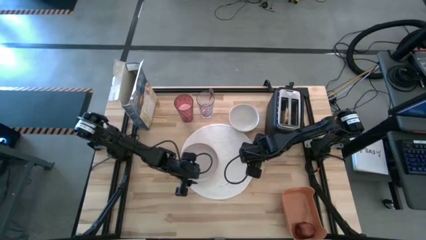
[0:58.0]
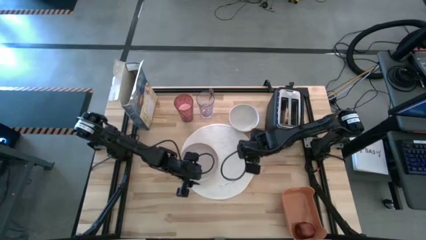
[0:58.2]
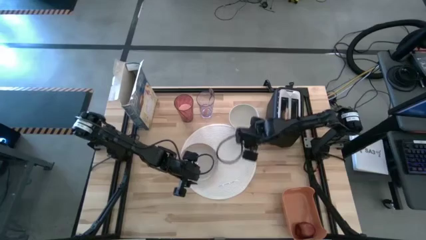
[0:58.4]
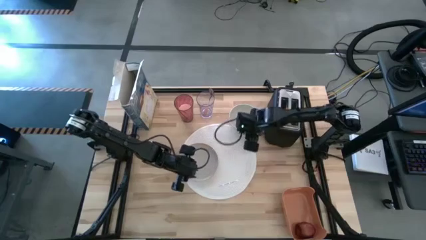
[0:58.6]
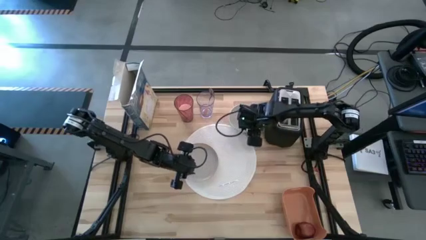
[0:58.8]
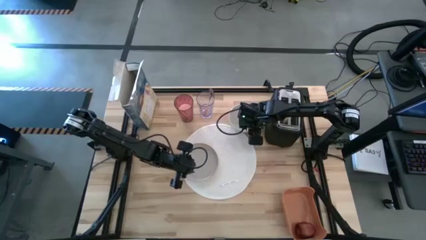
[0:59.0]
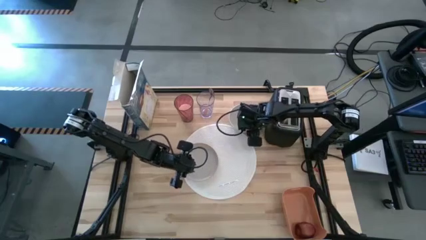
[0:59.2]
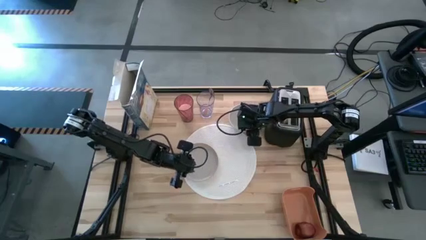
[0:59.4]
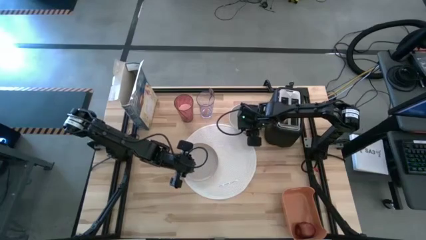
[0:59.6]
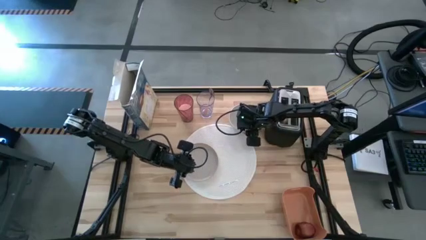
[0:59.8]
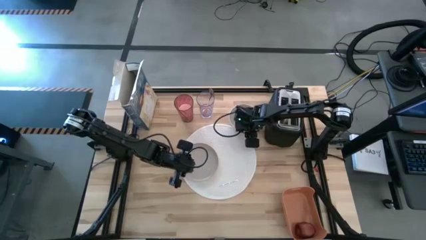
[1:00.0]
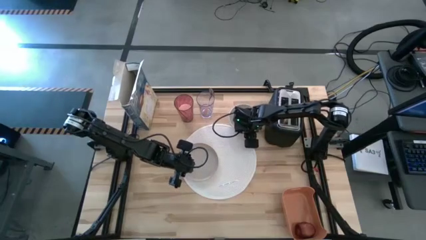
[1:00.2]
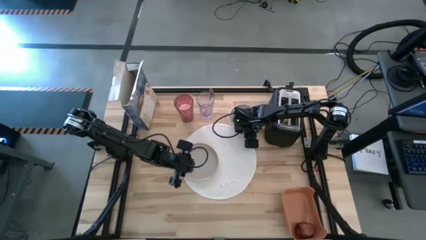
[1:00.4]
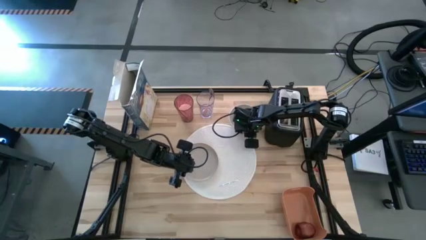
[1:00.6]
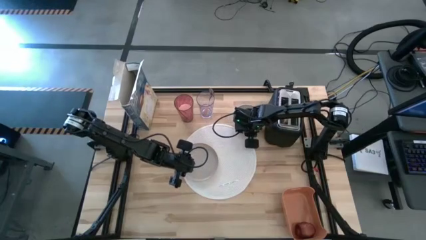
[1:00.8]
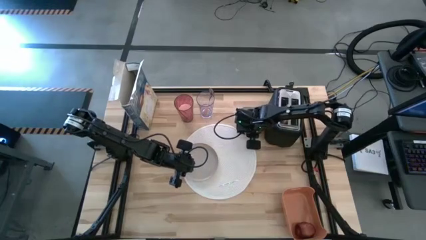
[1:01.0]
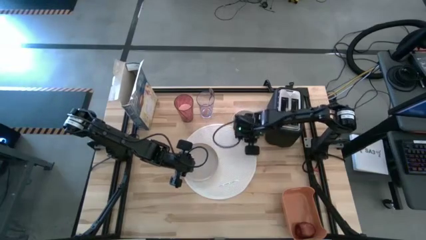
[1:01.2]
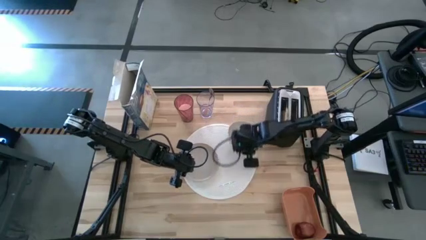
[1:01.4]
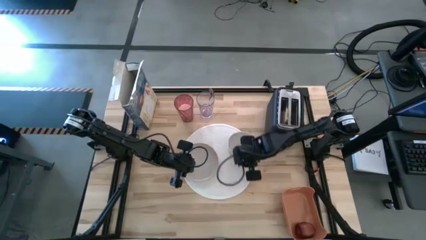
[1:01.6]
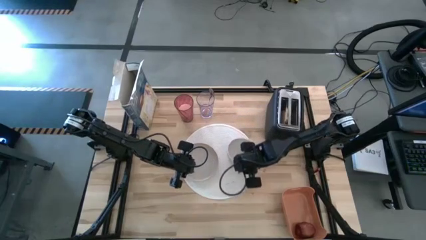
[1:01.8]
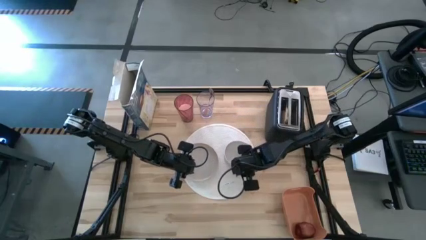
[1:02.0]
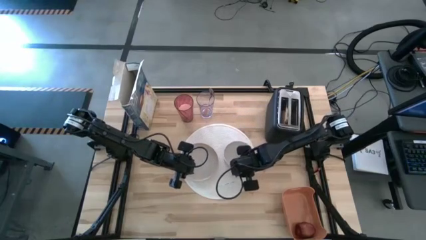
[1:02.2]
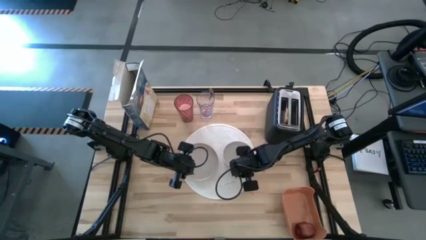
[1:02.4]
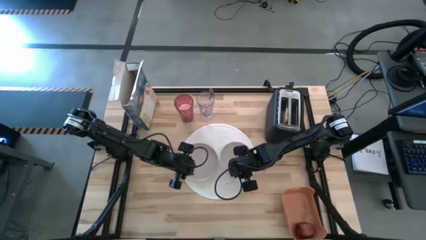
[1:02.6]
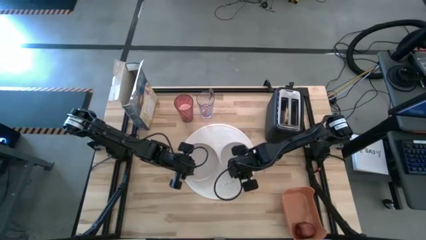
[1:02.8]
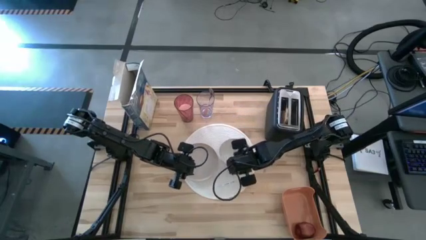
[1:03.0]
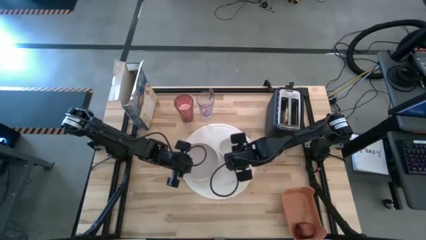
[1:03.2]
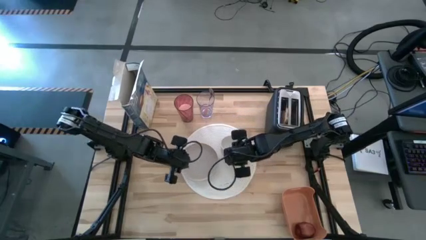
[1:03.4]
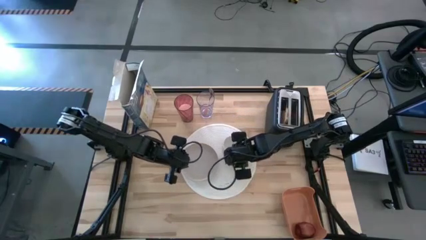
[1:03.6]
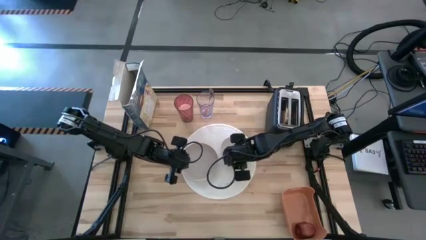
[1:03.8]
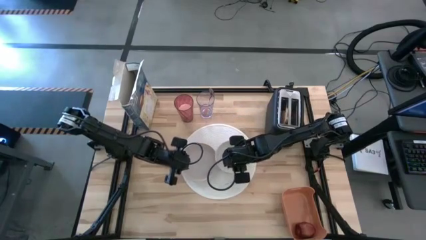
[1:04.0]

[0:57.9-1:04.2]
Task: Arrange a breakfast setting
Put the white bowl on the white placemat to the right side of the peach plate

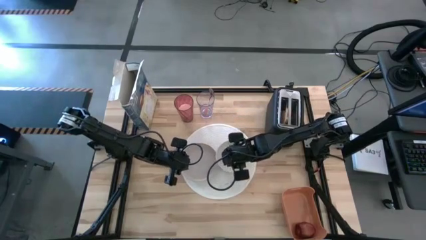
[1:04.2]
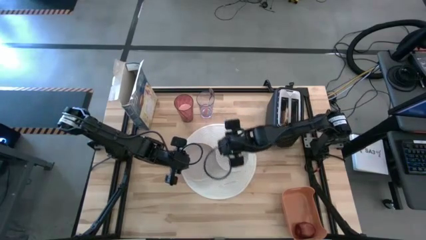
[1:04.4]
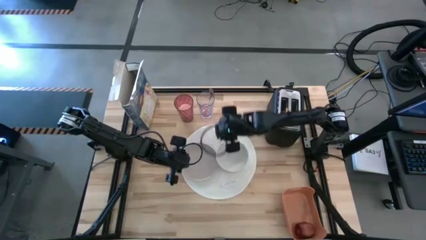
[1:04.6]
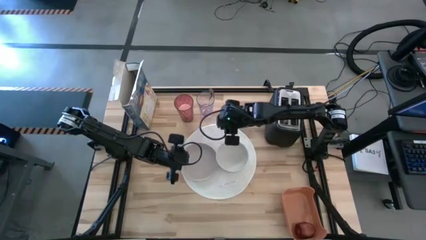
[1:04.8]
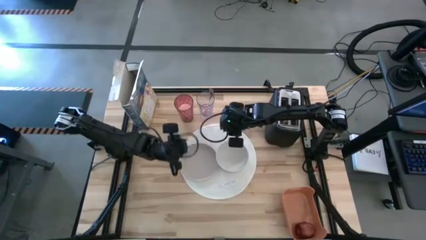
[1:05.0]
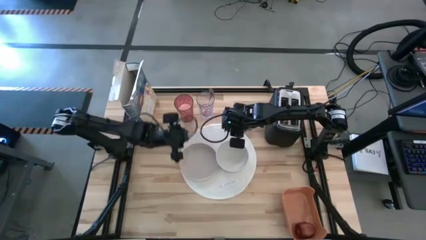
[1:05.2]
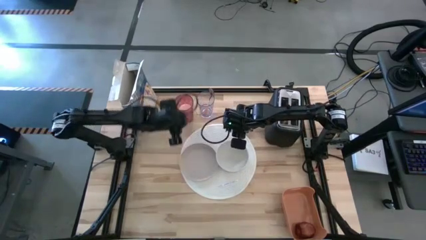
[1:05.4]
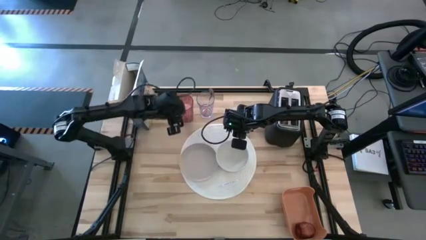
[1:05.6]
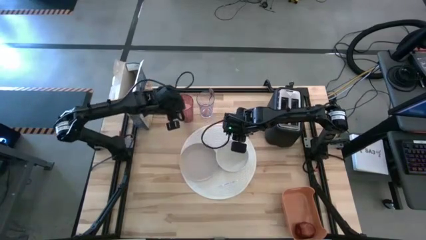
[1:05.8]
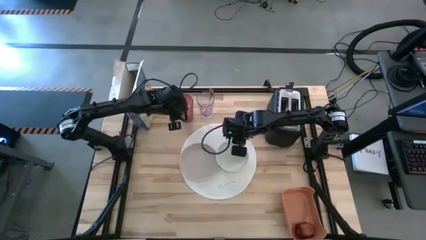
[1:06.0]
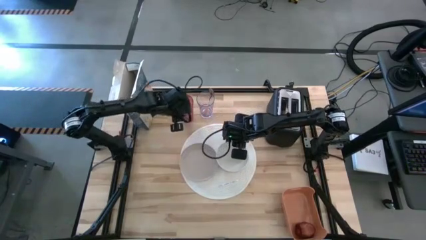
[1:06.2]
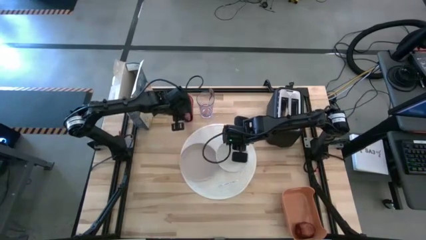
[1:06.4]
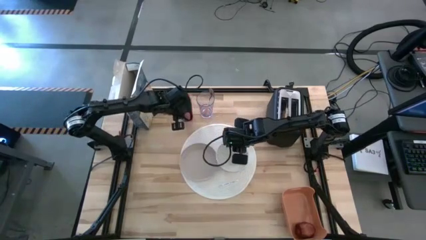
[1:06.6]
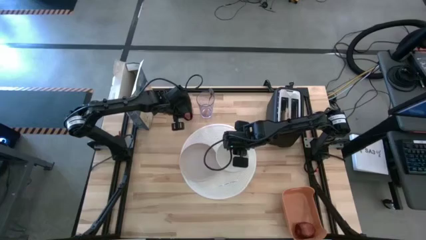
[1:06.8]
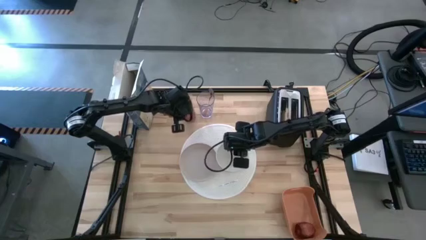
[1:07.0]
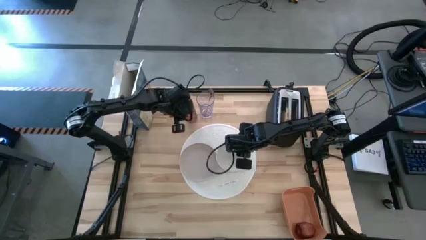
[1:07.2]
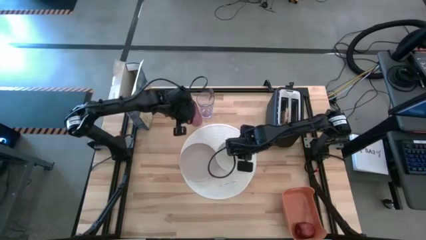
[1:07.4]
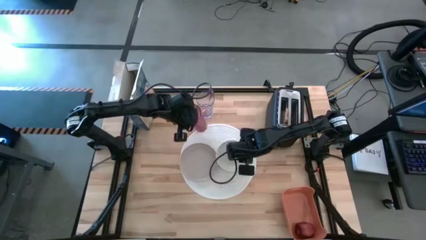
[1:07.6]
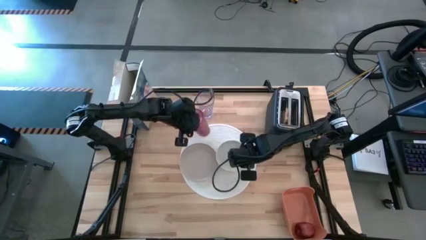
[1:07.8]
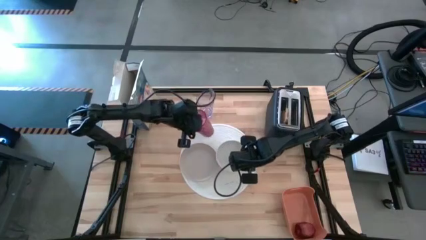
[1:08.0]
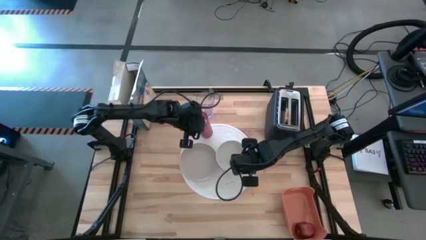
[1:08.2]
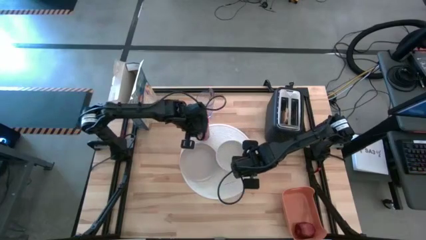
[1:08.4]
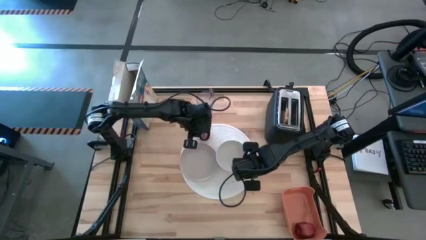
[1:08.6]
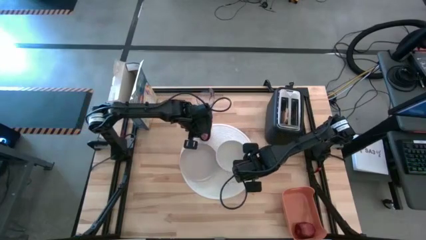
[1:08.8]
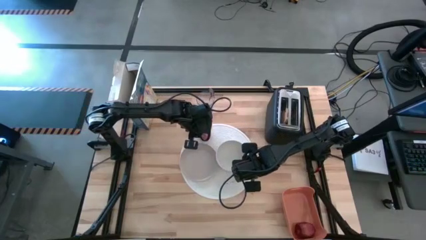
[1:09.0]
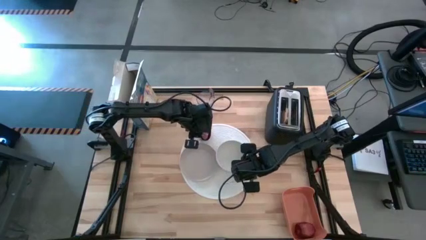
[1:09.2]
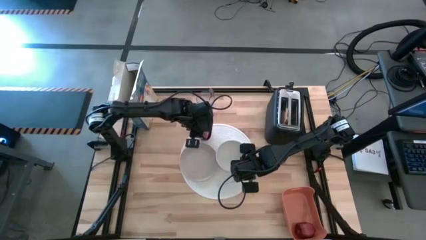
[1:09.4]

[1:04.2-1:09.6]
Put the the red cup of grain rice on the white placemat to the top of the peach plate

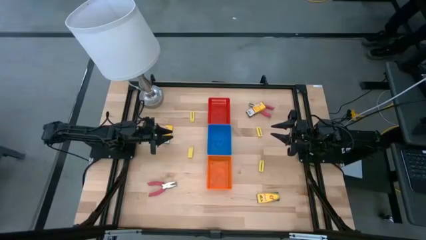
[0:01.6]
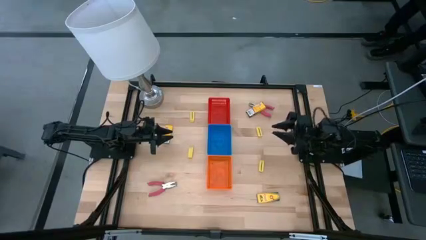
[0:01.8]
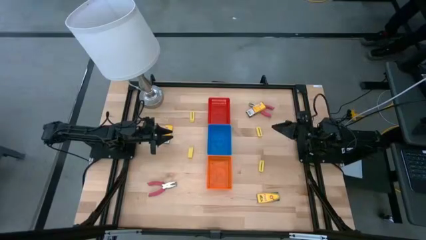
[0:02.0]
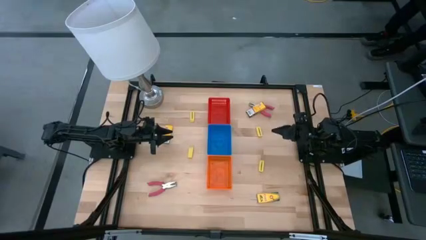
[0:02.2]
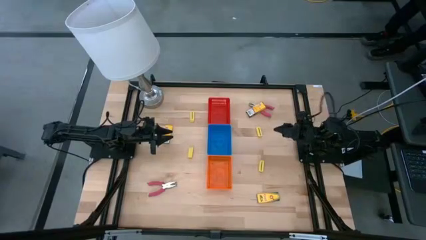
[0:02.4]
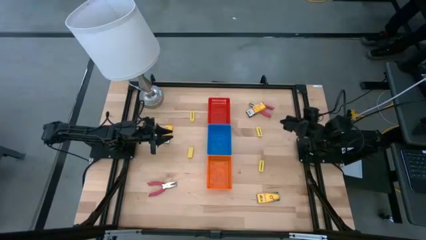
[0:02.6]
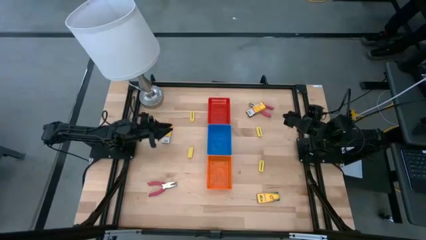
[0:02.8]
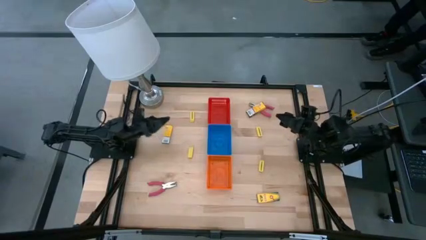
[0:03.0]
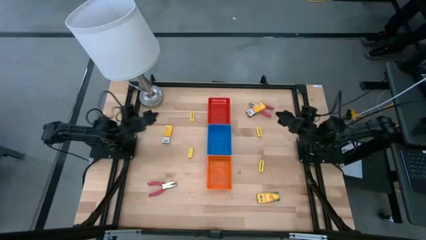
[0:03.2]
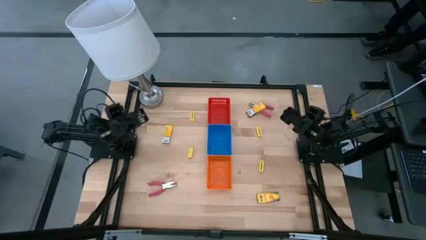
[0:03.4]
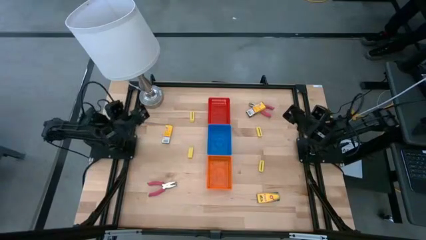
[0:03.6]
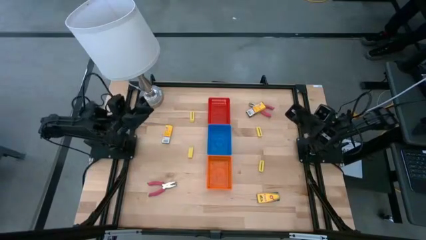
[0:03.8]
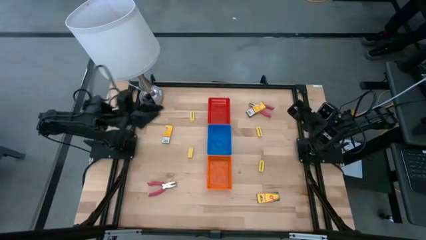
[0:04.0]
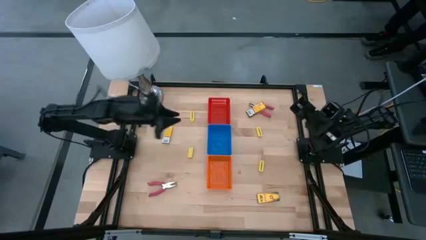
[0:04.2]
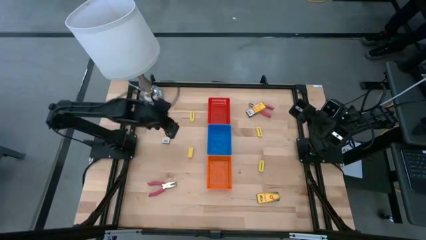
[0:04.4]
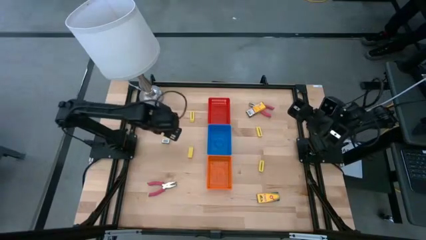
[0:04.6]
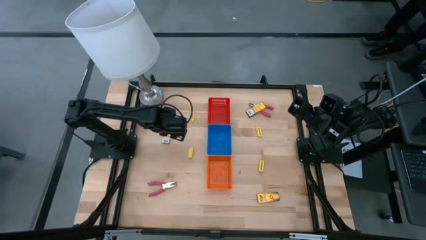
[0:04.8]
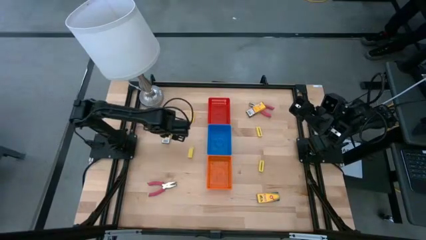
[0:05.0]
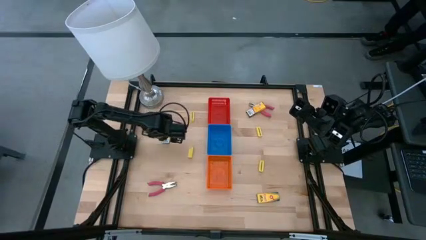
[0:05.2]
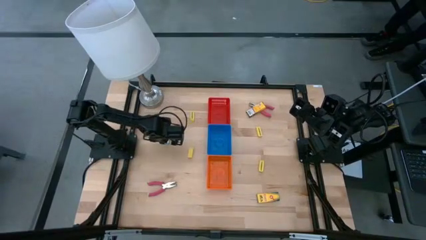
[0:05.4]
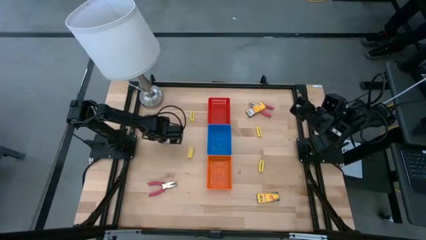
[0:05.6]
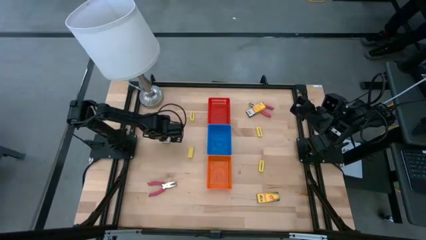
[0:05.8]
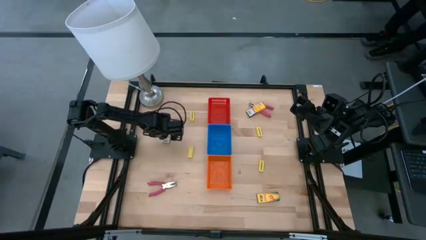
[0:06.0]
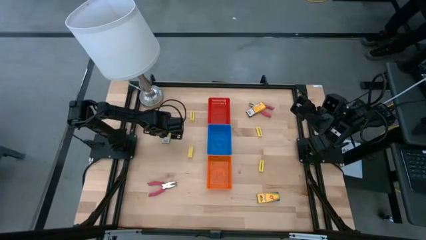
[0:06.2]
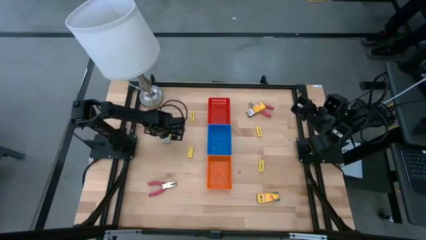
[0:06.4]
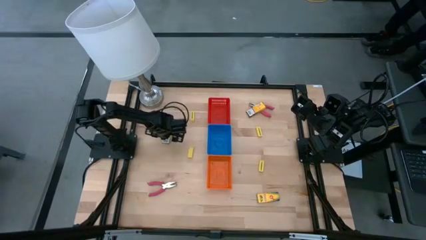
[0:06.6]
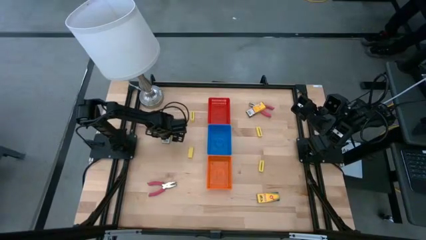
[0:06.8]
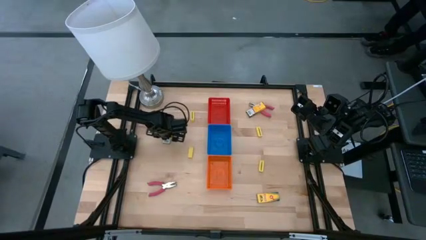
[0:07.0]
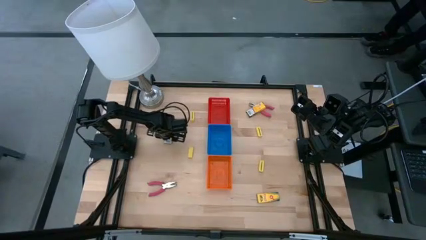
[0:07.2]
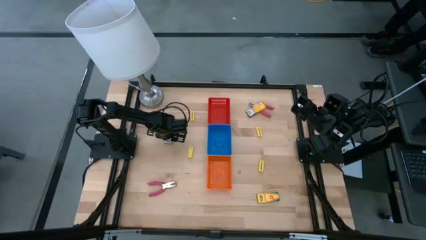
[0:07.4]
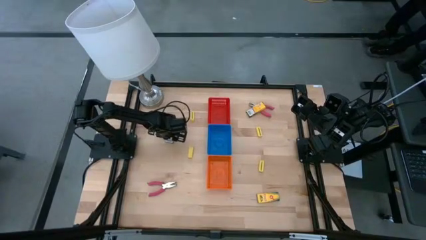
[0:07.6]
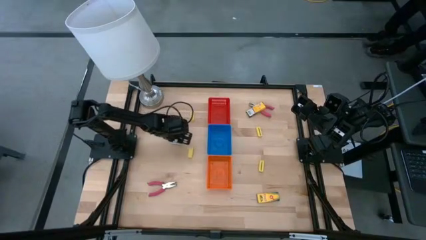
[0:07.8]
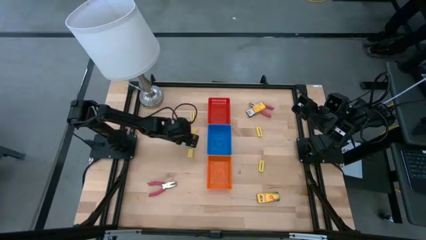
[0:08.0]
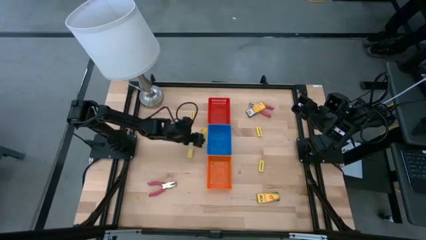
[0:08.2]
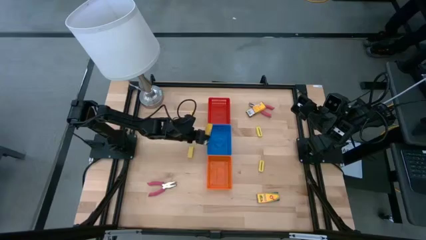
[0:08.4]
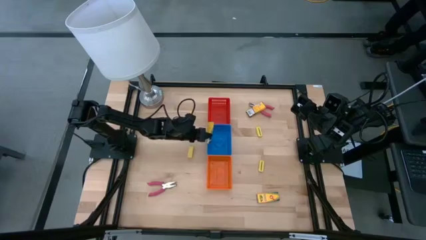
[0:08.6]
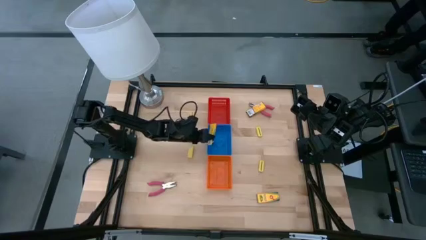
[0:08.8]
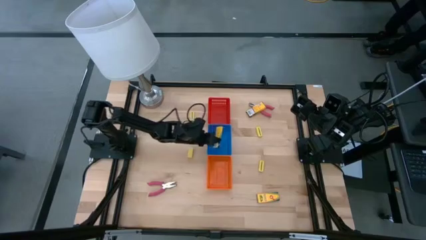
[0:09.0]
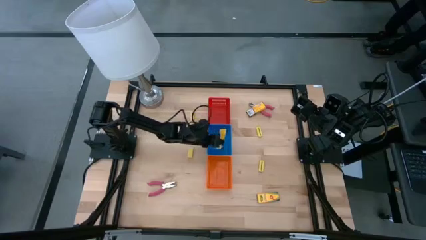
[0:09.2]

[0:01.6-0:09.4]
Task: Pick & Place School Supplies
Put the yellow crayon box into the blue bin
